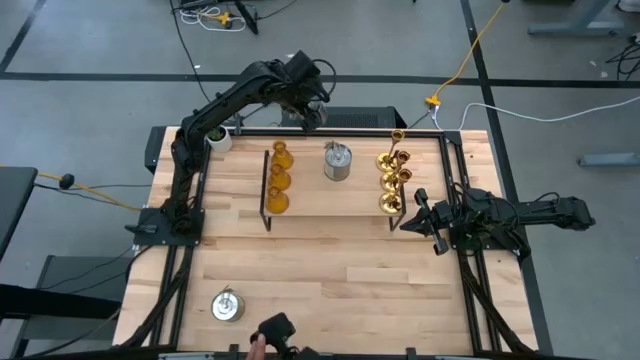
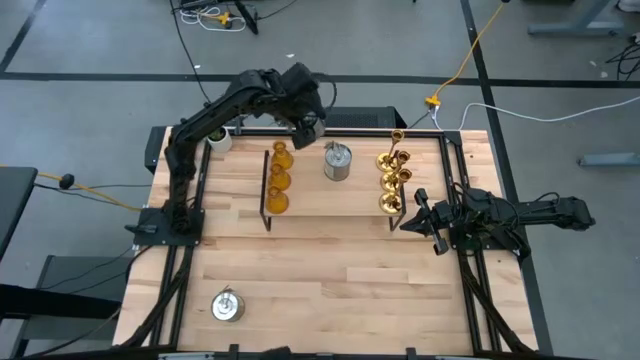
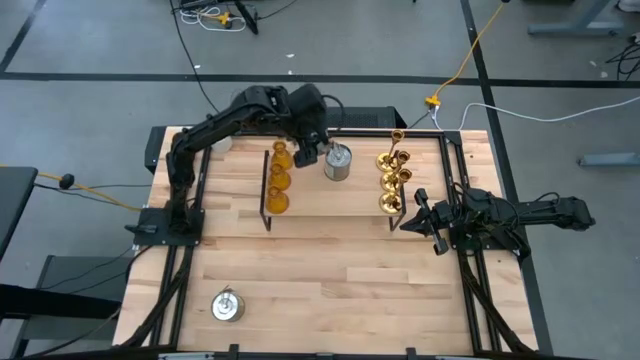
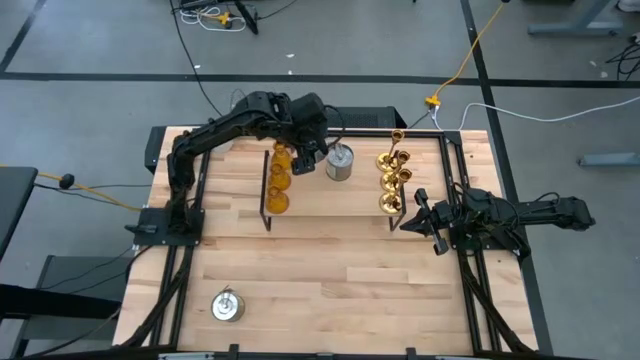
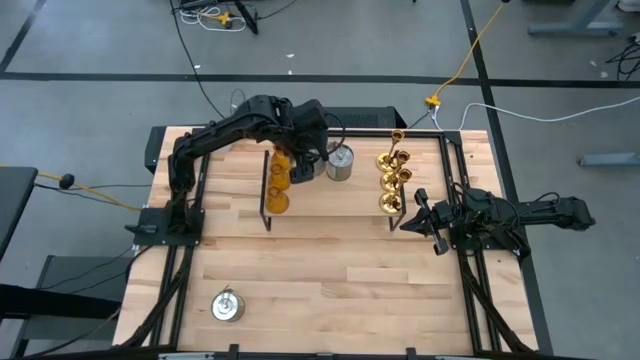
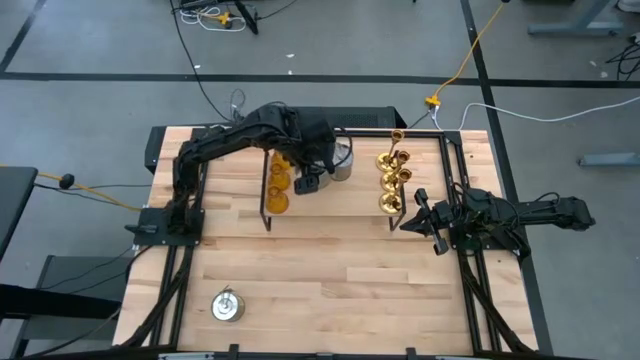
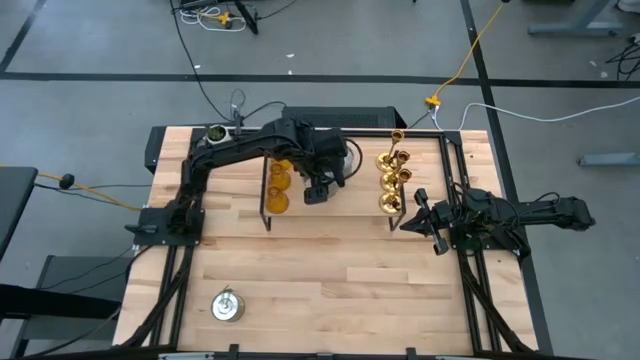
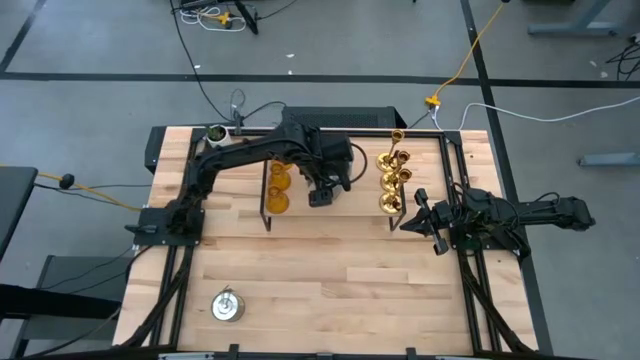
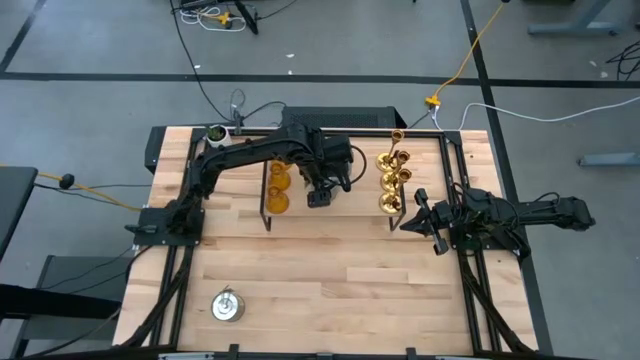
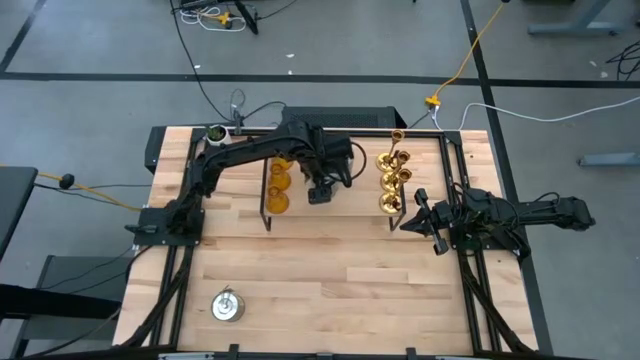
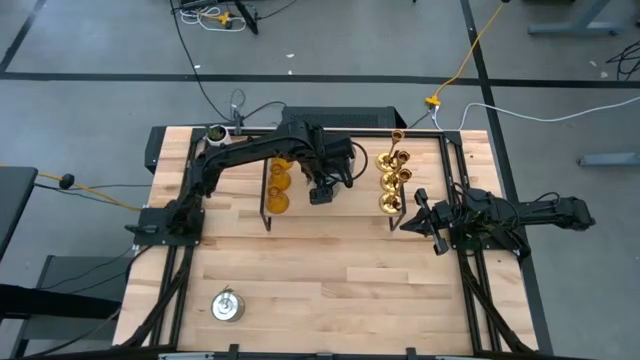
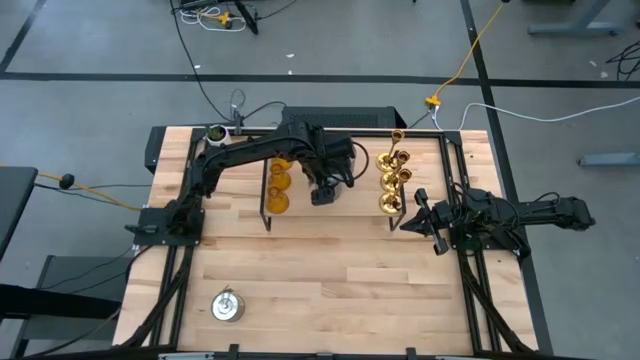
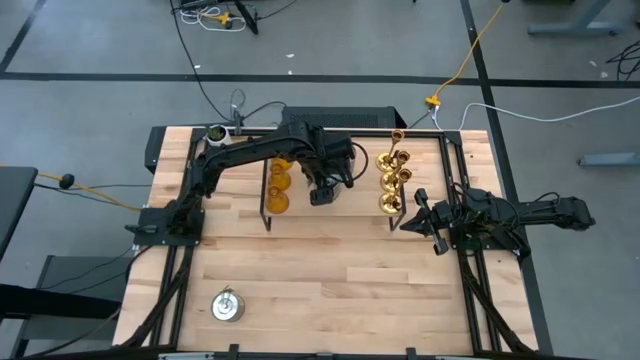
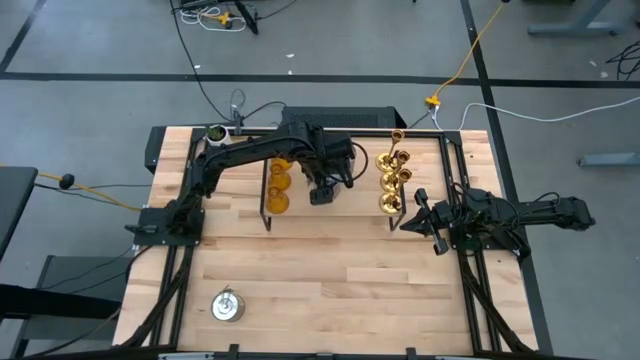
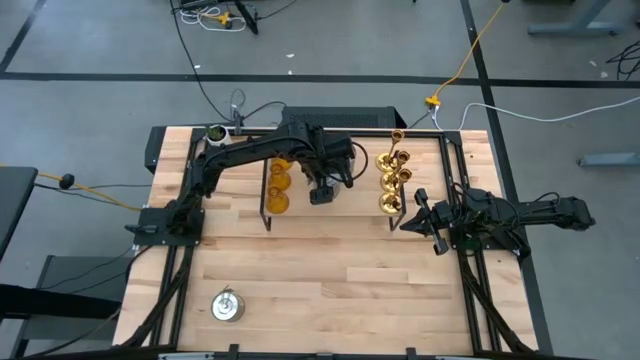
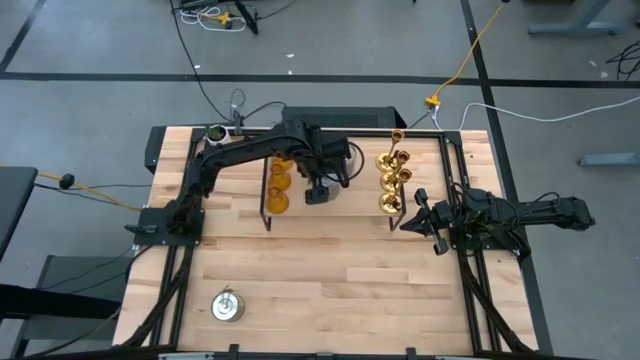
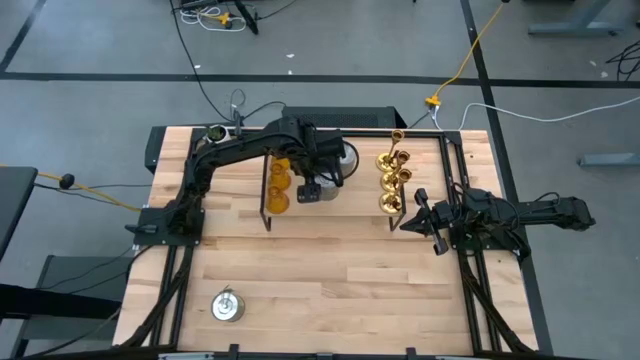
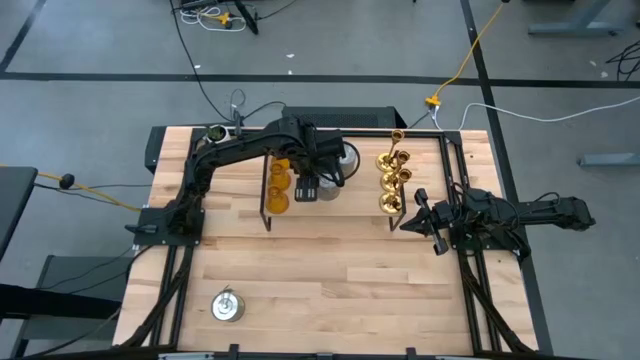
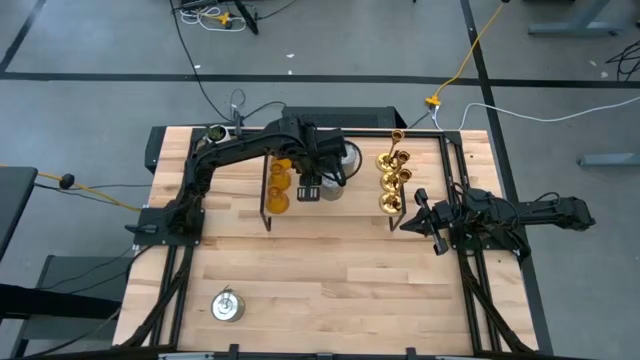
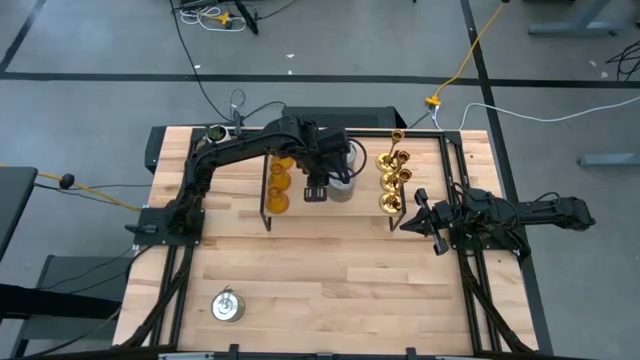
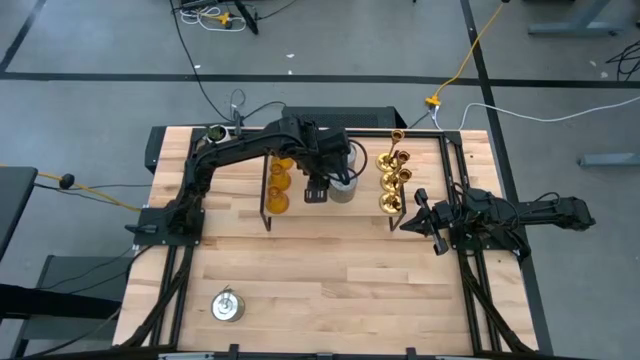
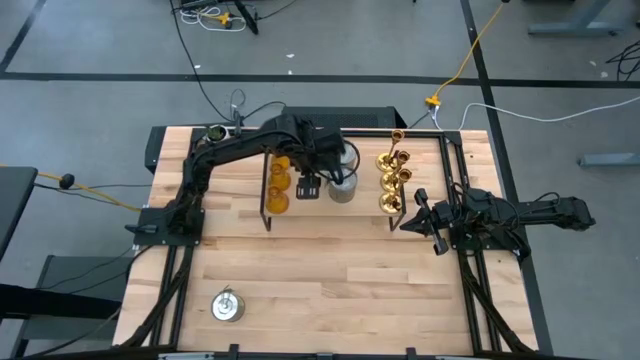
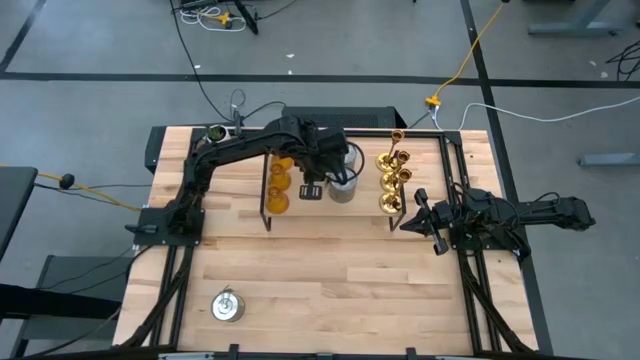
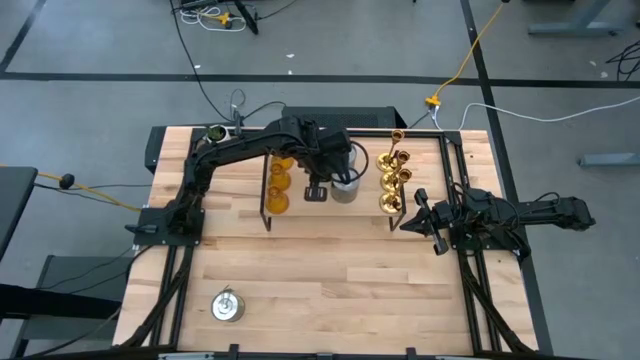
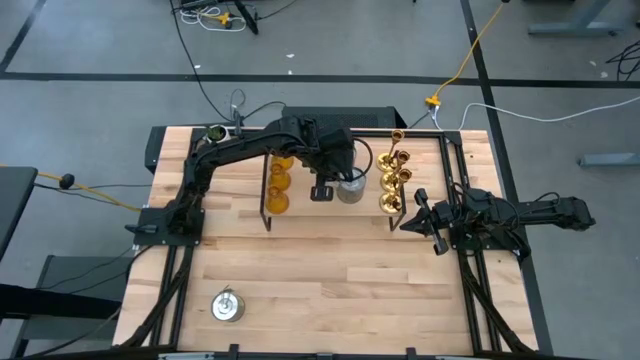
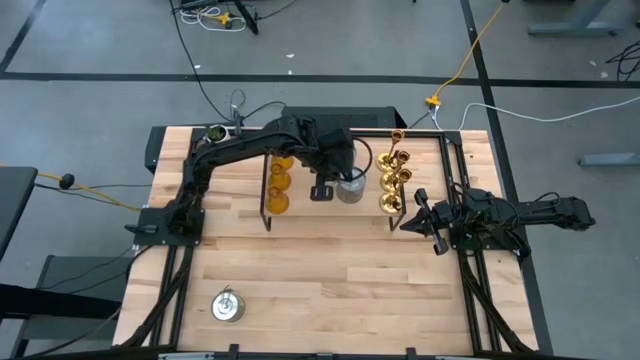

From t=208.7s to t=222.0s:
Task: Pick & Place candle stick holders
Put the top scented candle on the shelf

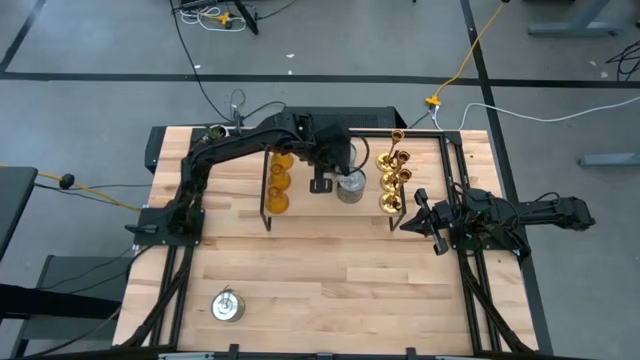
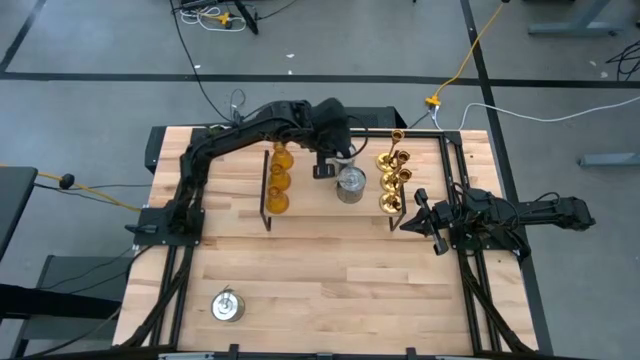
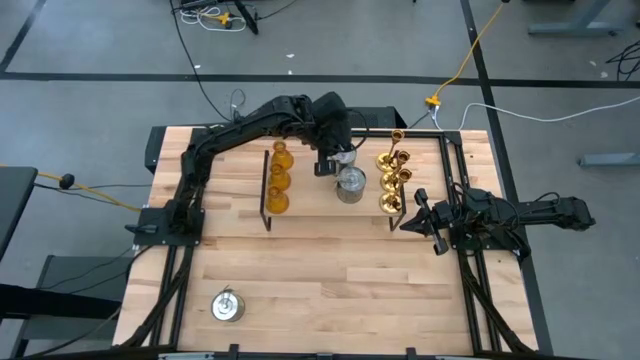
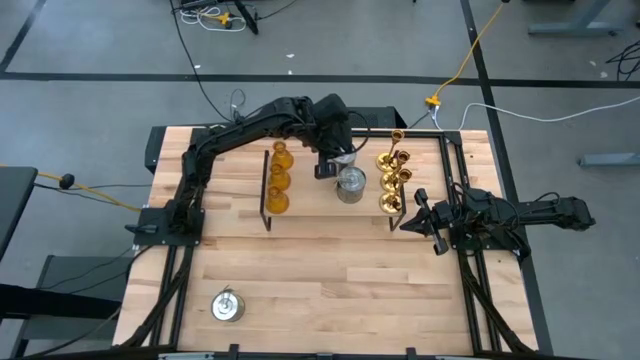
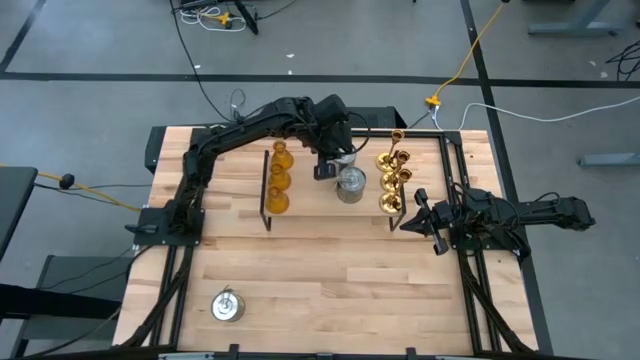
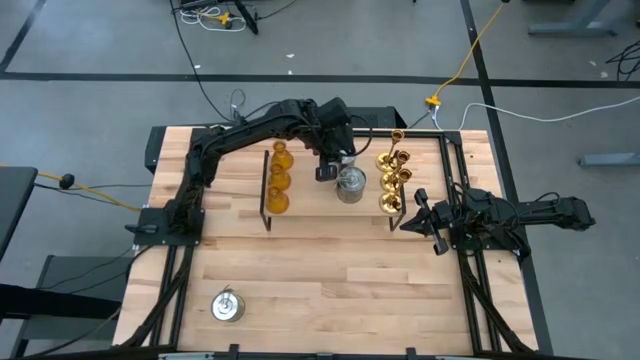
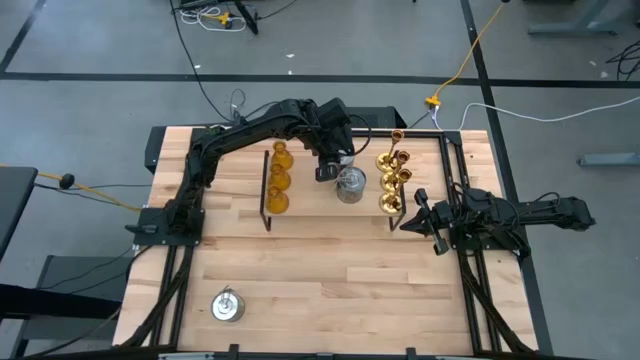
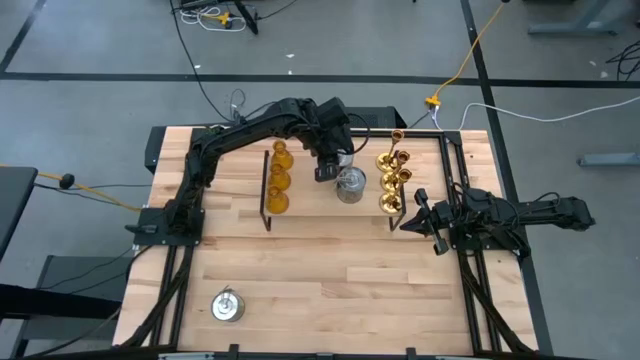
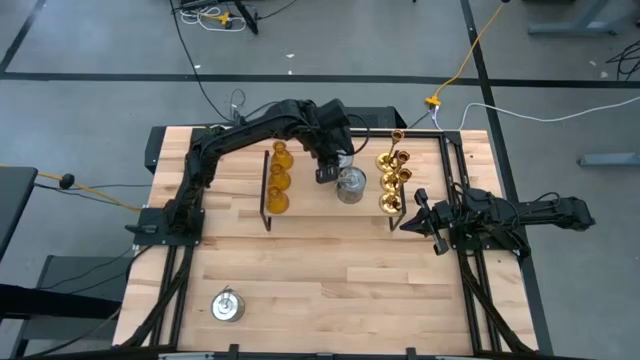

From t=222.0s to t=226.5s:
Adjust the scented candle on the shelf

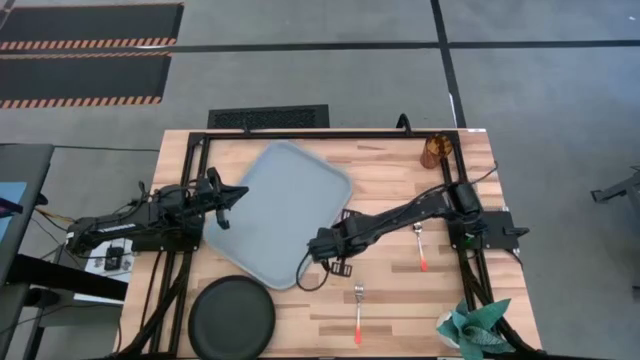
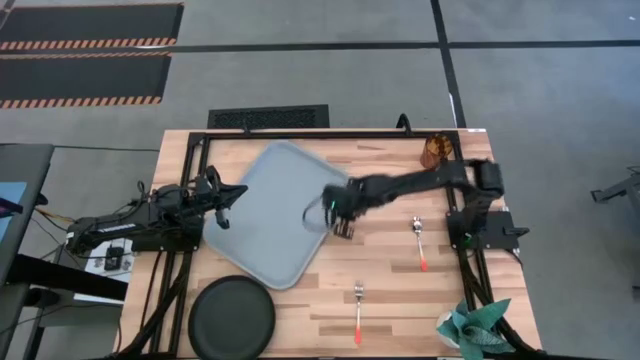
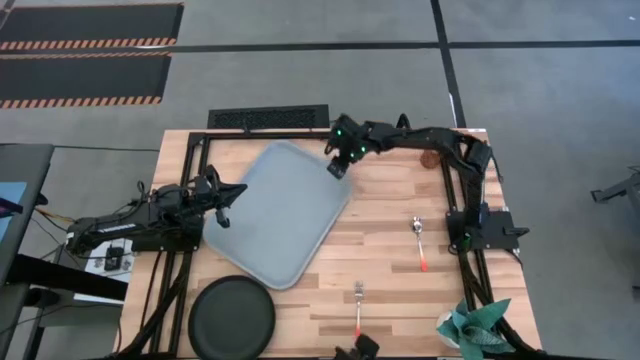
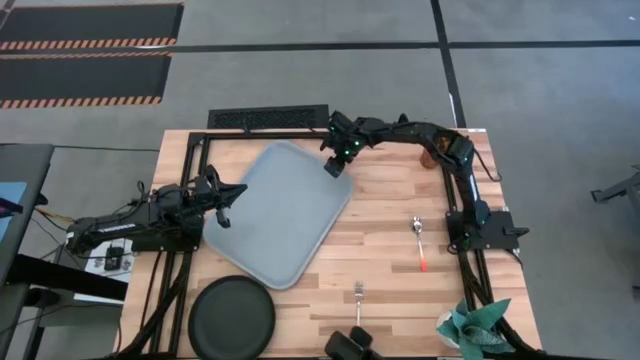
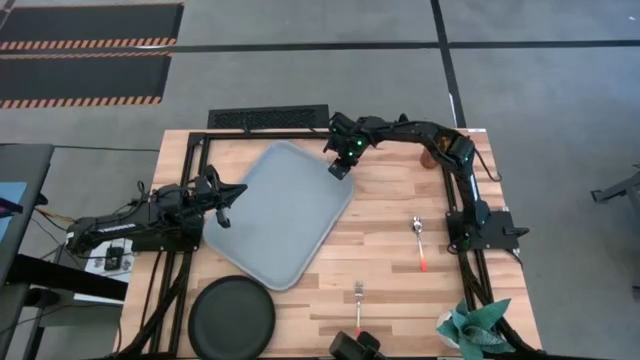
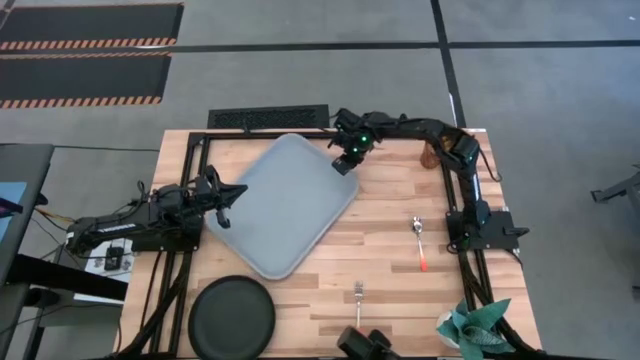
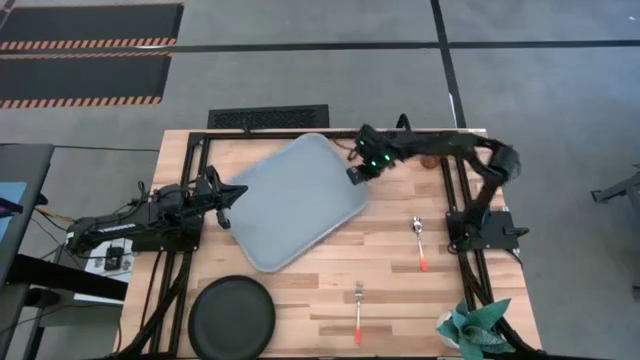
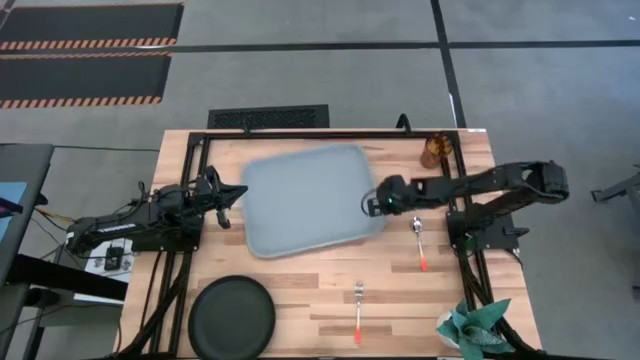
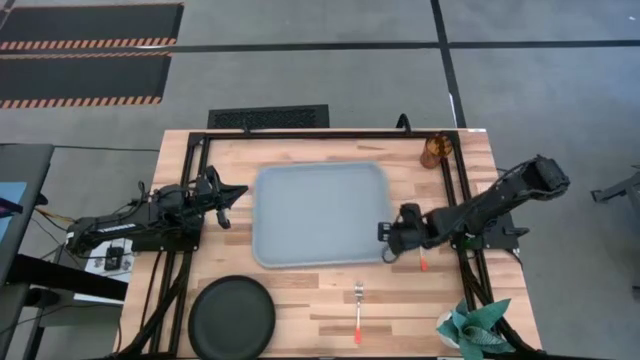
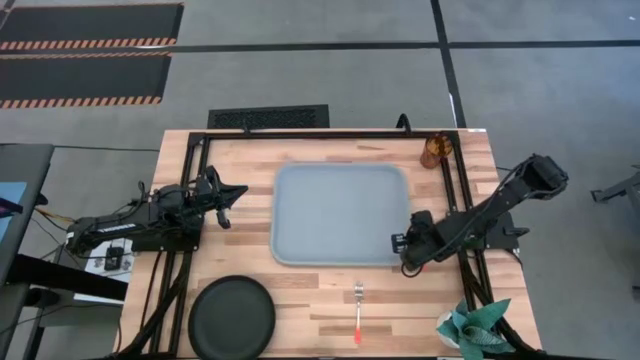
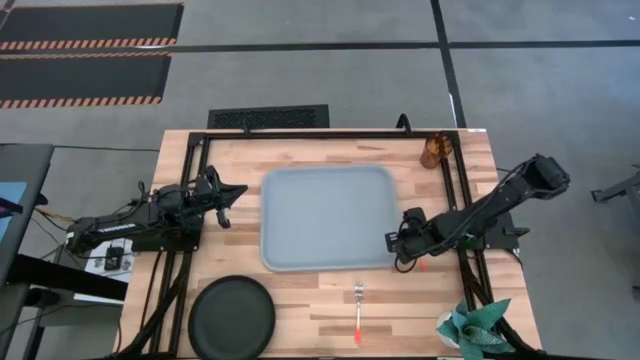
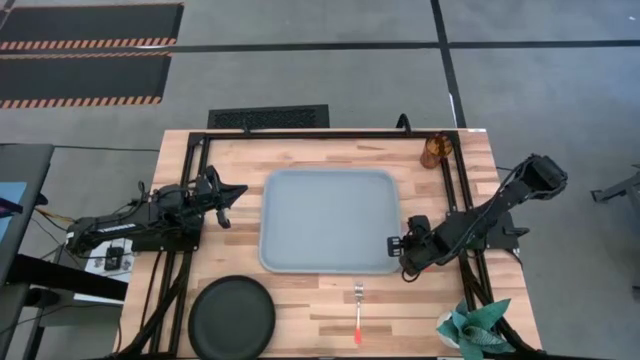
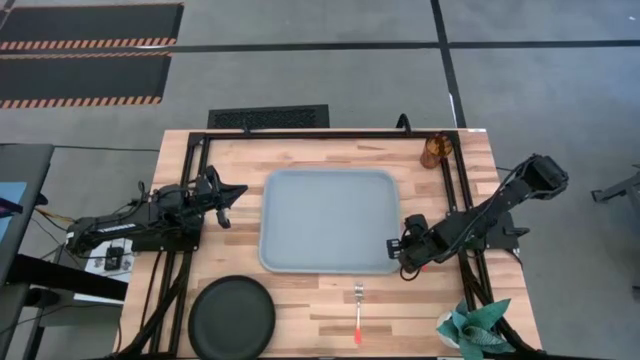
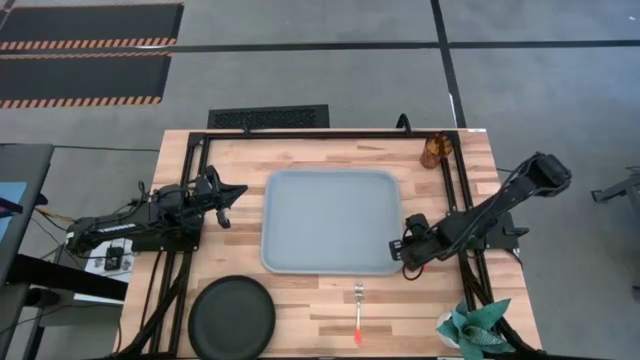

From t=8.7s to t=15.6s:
Task: Pick and place plate/cup/fork/spoon on tray
Prepare the gray serving tray
